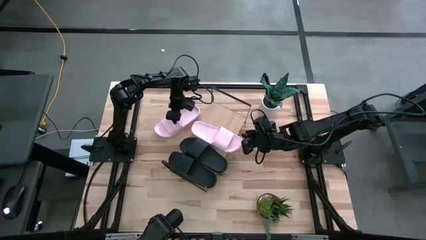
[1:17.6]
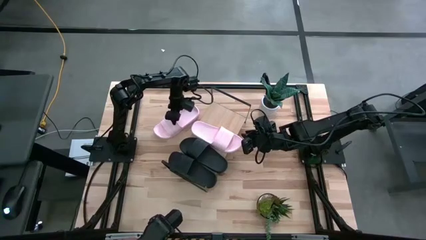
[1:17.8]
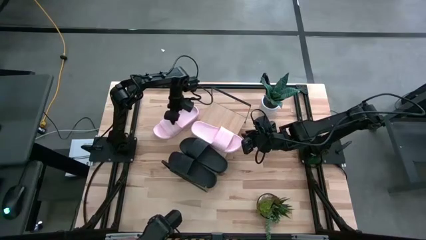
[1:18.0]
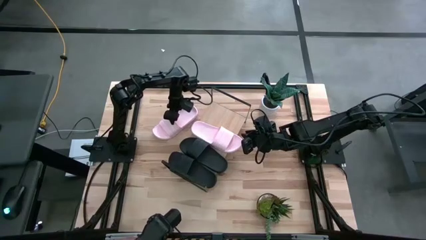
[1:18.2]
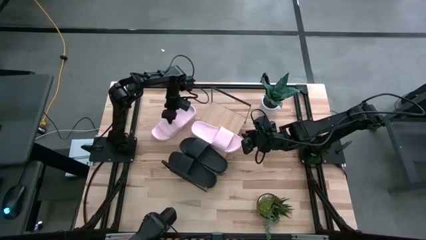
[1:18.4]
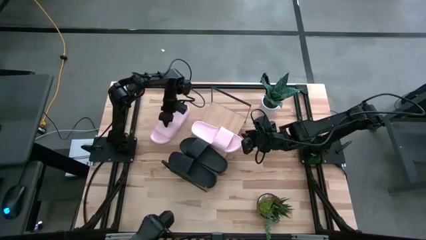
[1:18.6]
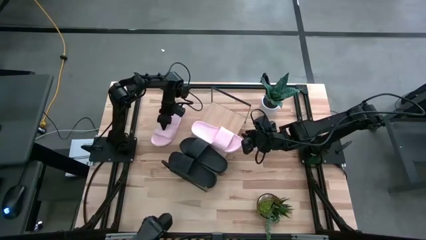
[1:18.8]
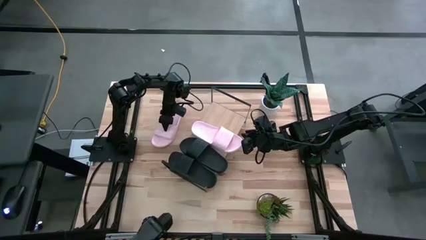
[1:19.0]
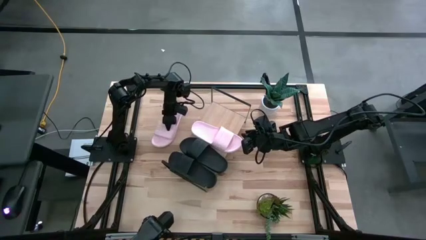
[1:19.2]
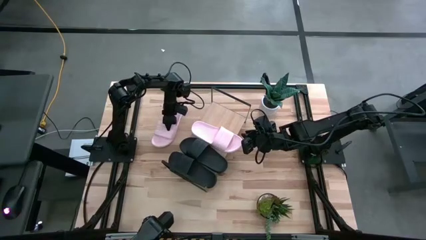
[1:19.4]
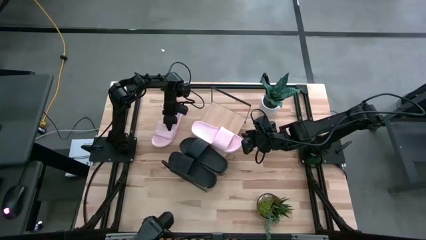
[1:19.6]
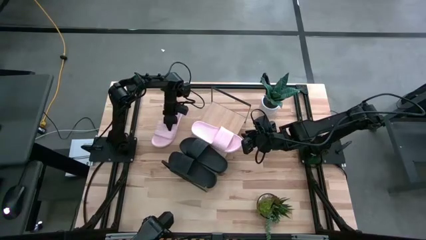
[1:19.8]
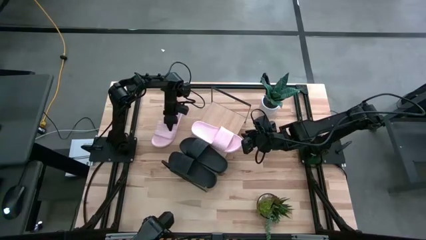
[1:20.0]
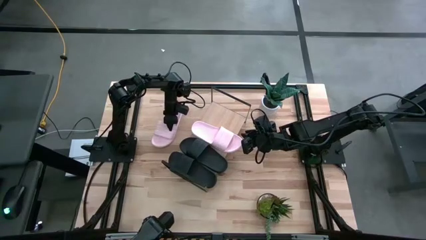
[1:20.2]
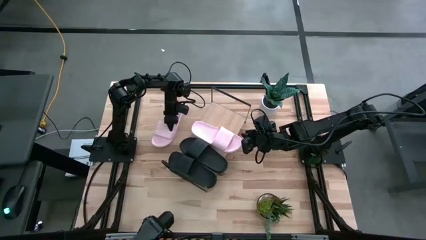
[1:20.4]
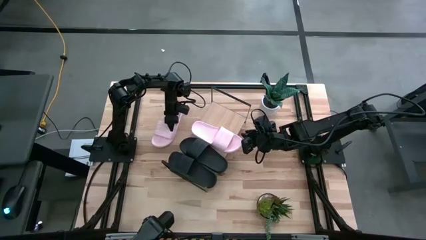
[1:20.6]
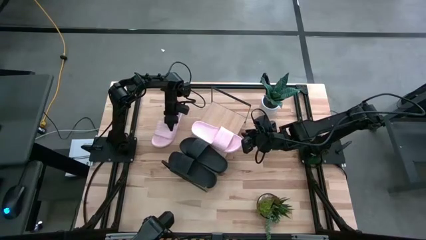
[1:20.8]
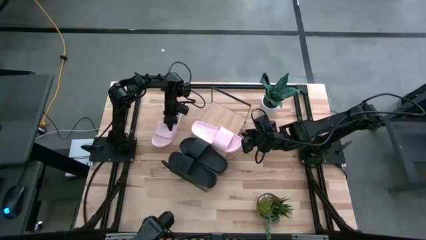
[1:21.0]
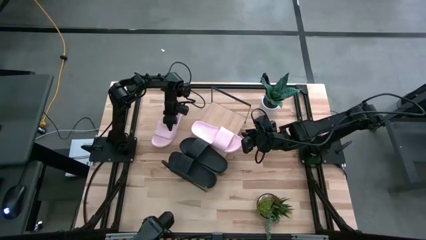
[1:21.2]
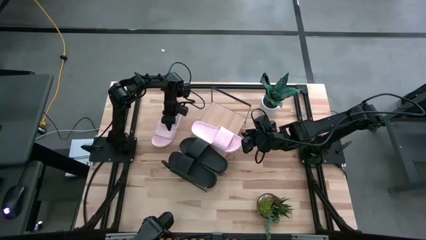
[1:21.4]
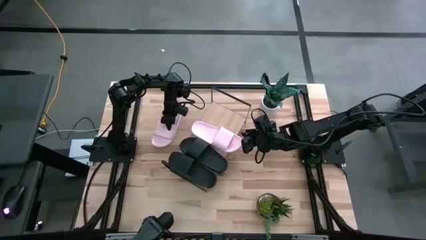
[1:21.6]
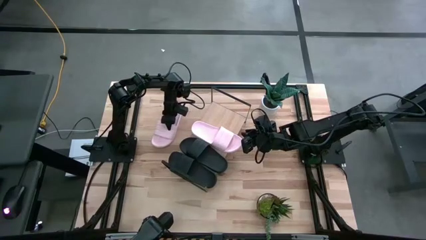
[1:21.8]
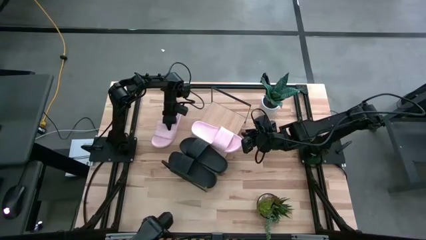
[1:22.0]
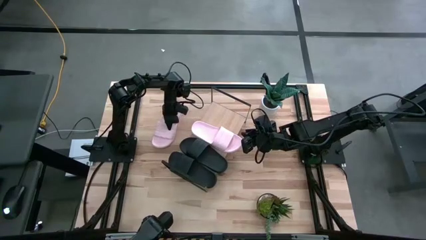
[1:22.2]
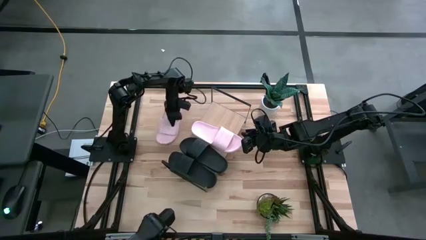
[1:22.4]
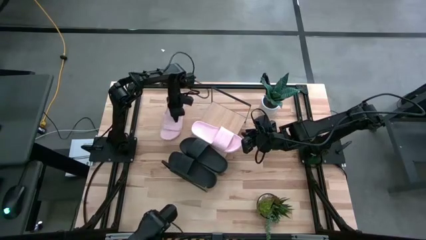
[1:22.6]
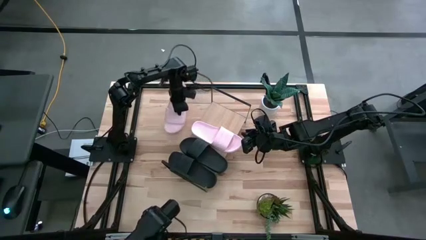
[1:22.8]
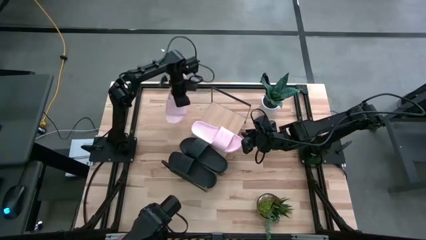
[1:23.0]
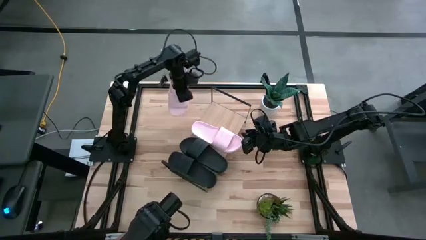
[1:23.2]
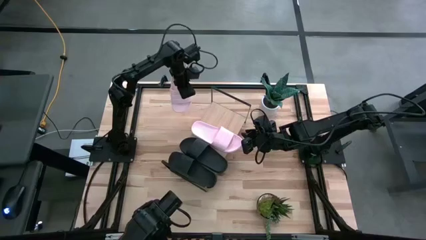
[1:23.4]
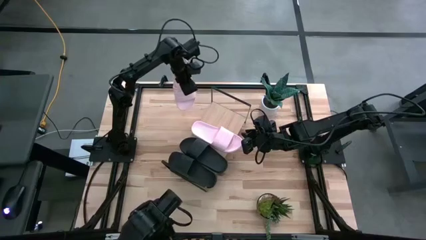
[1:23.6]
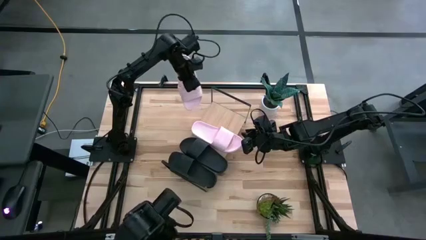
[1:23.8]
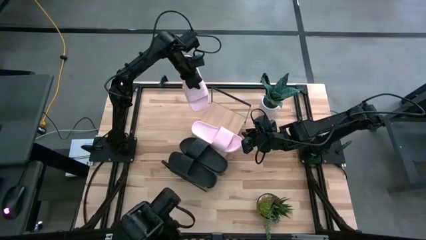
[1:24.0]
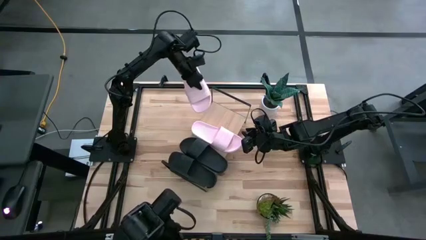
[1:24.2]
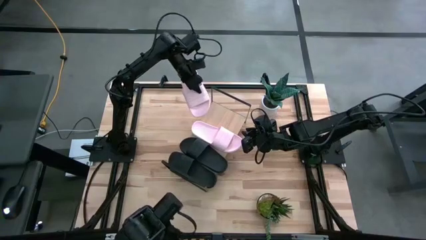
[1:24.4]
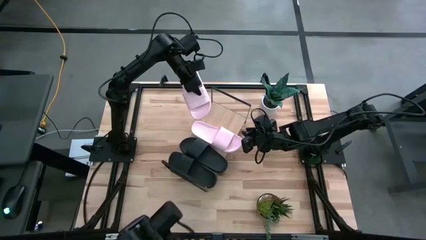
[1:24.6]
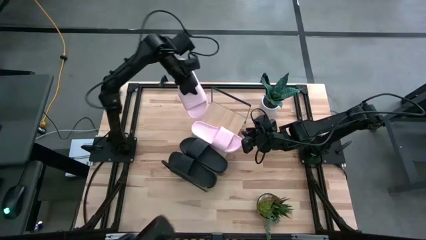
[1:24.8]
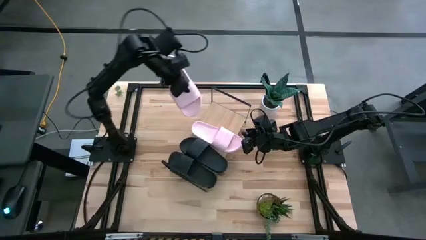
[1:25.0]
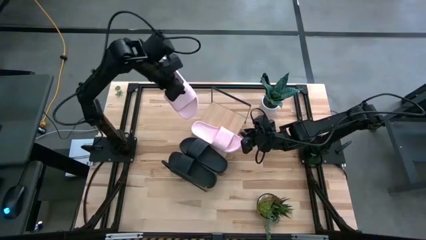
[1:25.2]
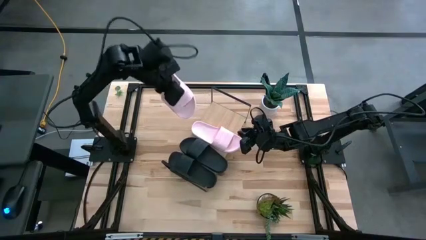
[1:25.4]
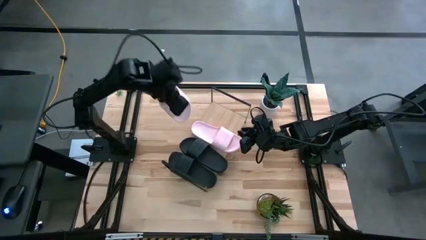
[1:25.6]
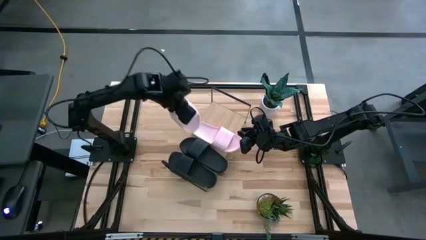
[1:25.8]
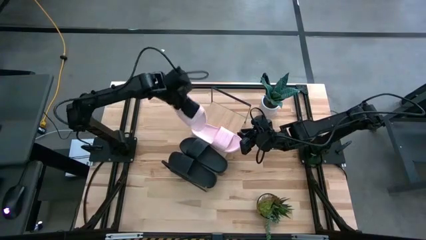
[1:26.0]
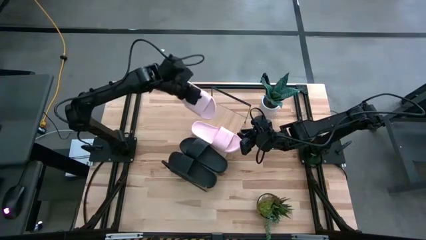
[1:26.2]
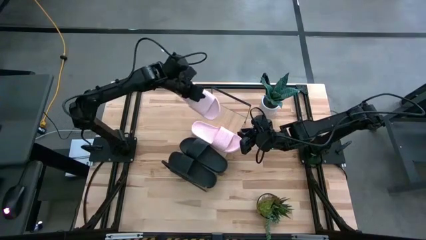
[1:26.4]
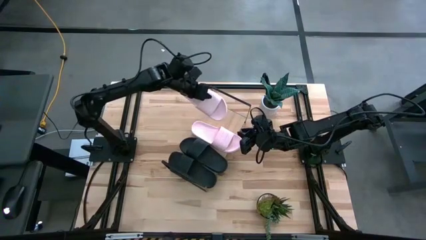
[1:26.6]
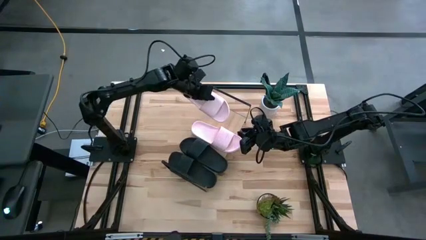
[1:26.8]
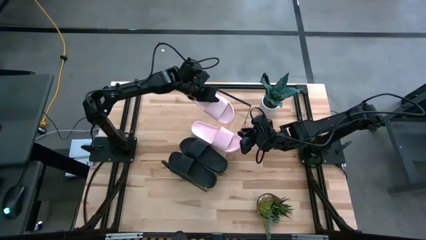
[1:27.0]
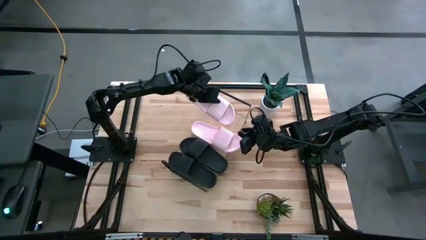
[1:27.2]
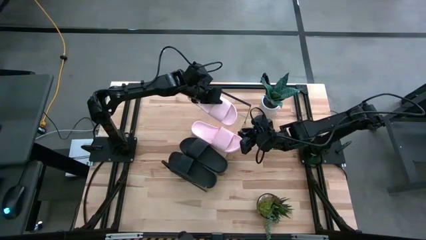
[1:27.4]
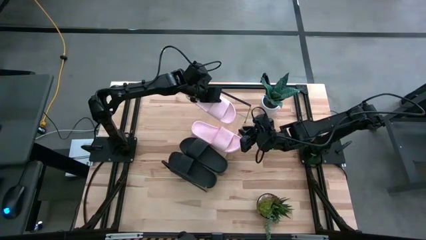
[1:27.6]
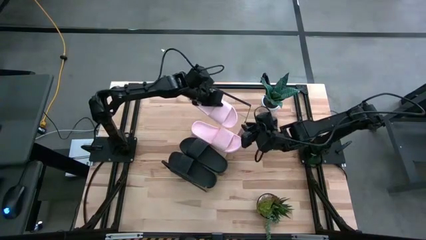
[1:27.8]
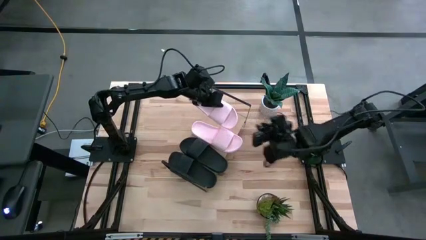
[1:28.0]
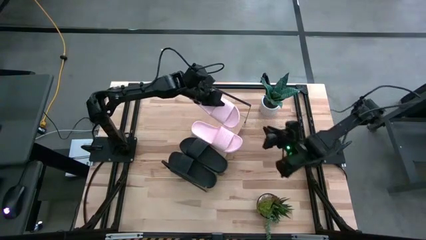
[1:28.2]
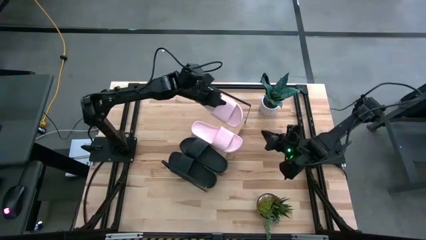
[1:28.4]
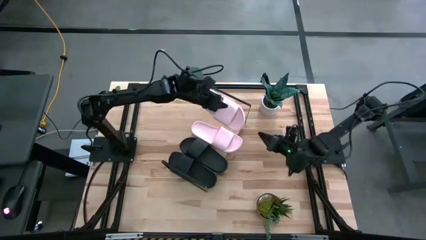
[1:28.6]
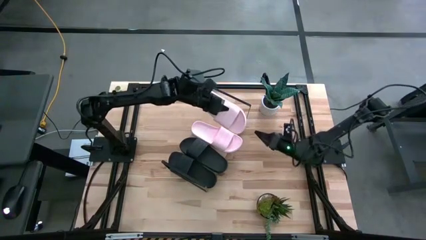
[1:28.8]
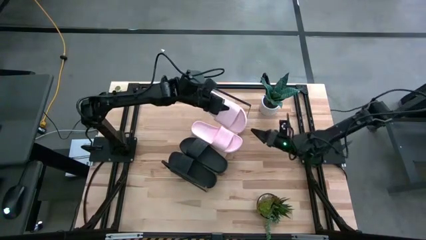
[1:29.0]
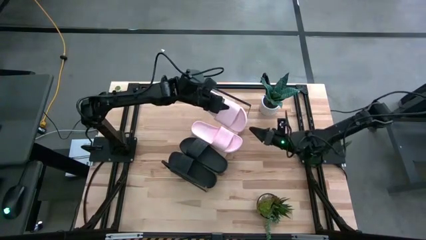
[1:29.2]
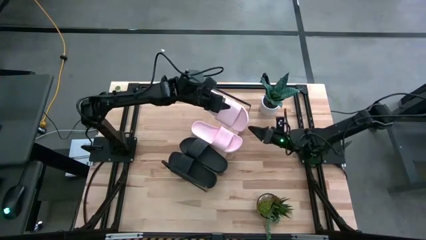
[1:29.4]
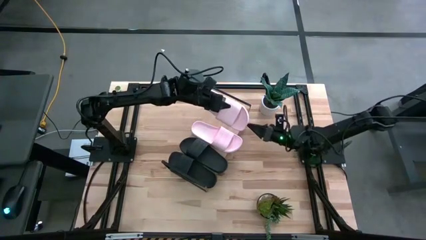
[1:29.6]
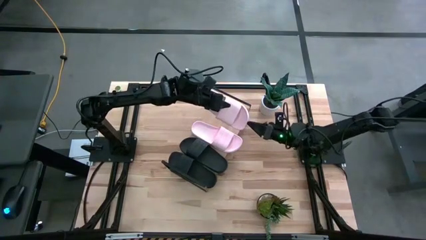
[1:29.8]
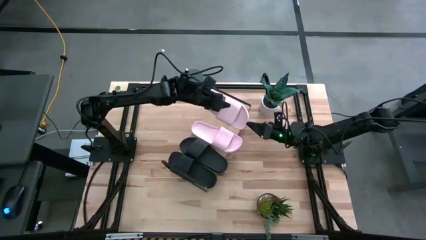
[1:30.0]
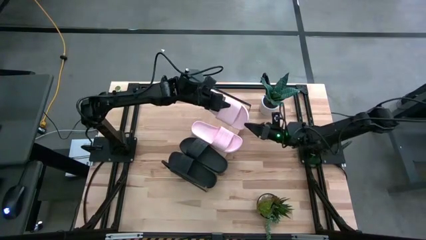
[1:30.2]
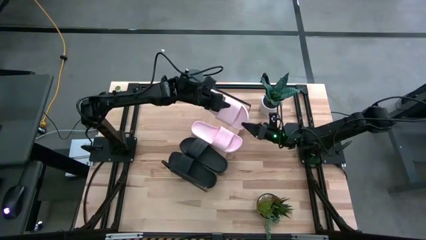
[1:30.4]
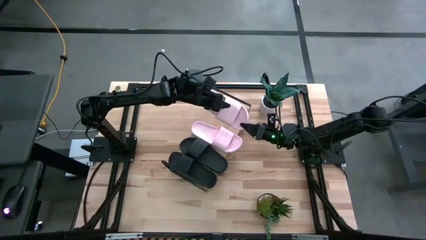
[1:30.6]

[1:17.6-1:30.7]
Task: Pick and place slides into the shelf
Put the pink slipper on the shelf
